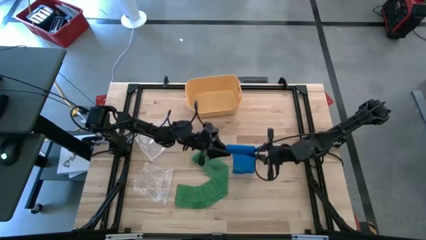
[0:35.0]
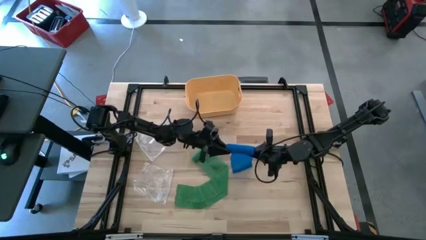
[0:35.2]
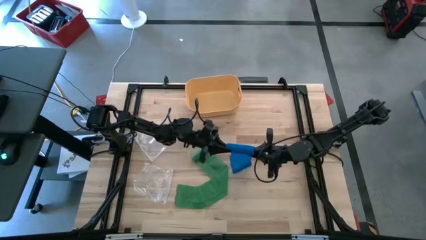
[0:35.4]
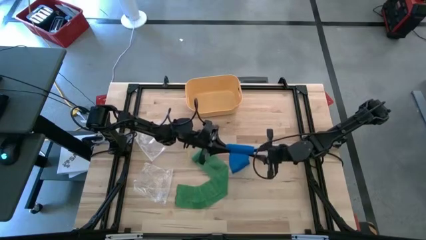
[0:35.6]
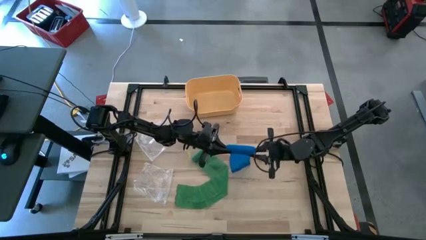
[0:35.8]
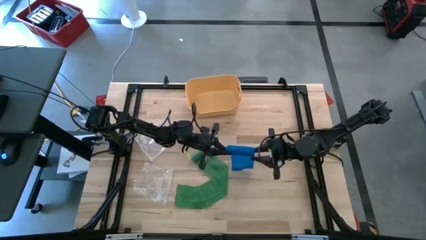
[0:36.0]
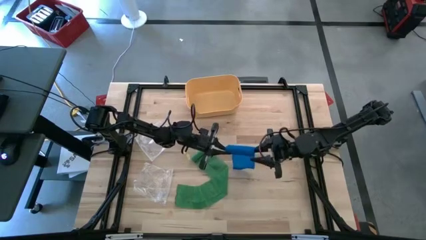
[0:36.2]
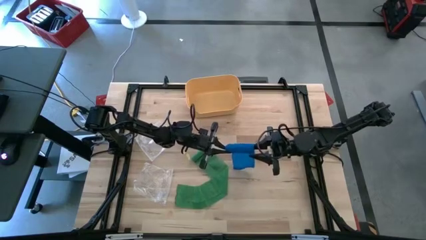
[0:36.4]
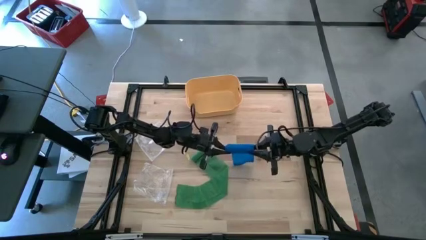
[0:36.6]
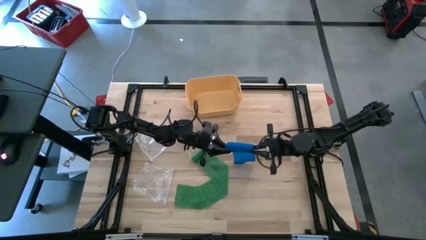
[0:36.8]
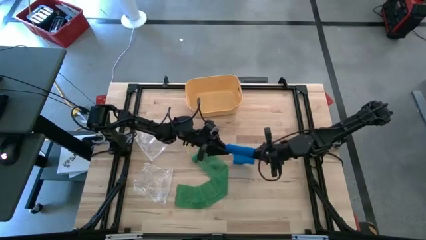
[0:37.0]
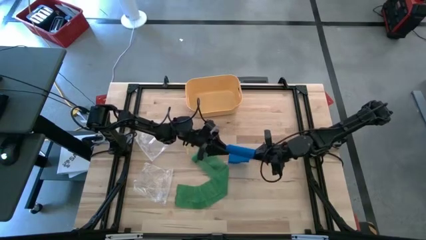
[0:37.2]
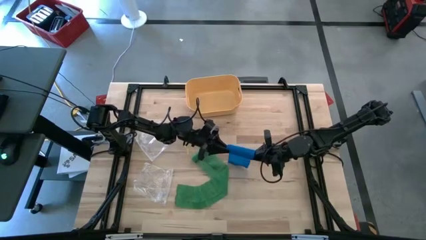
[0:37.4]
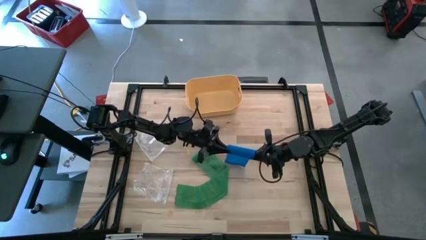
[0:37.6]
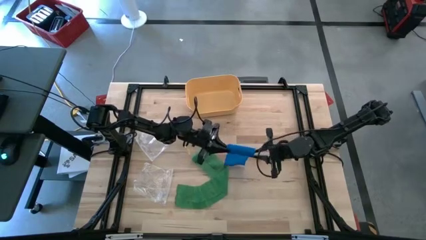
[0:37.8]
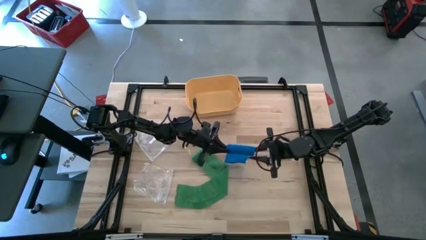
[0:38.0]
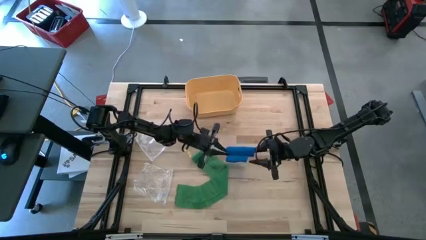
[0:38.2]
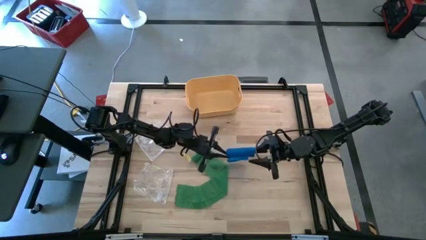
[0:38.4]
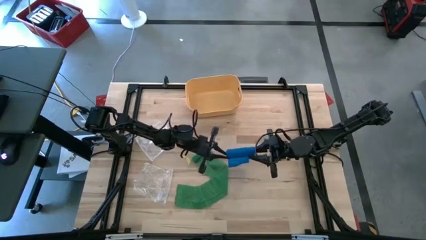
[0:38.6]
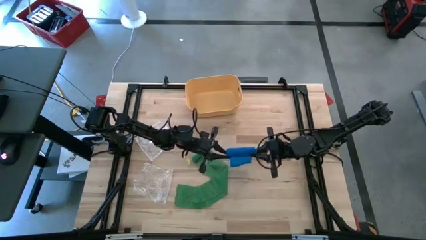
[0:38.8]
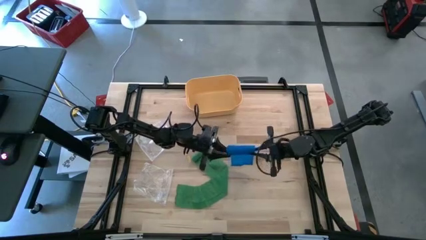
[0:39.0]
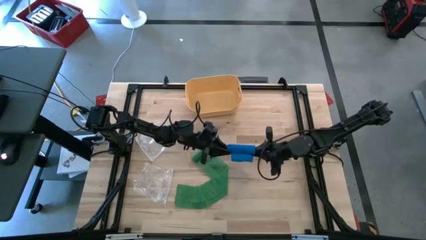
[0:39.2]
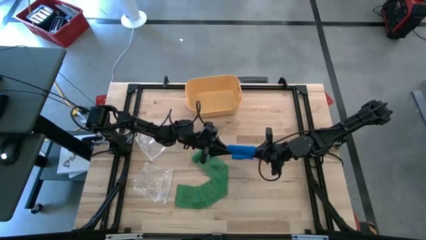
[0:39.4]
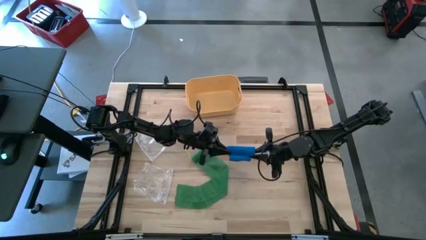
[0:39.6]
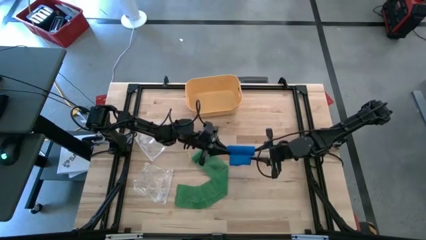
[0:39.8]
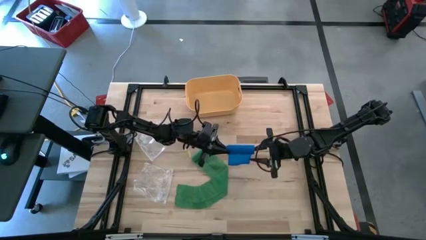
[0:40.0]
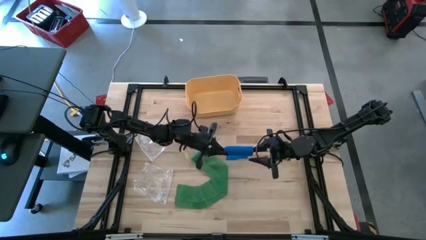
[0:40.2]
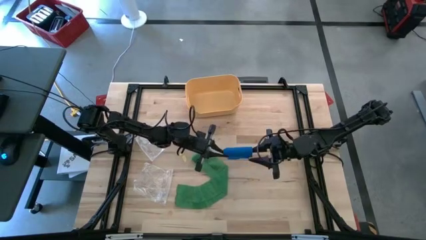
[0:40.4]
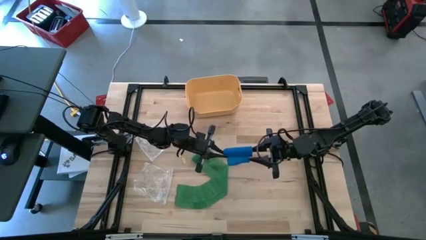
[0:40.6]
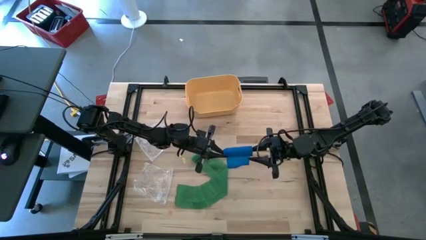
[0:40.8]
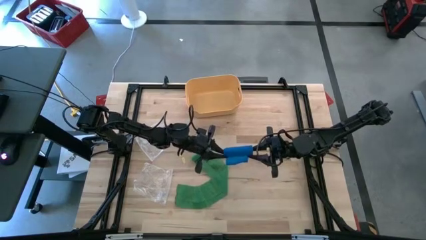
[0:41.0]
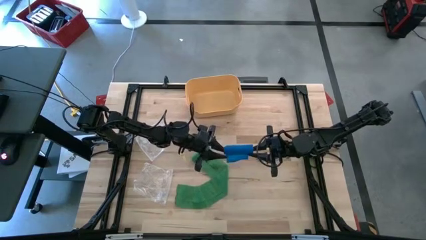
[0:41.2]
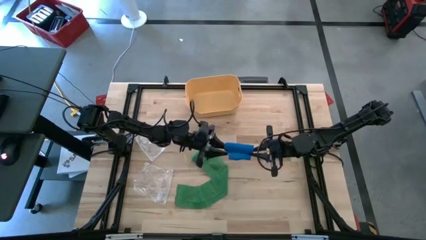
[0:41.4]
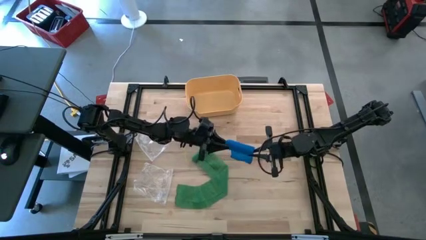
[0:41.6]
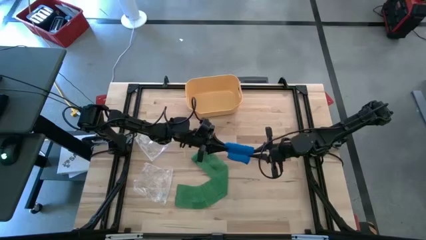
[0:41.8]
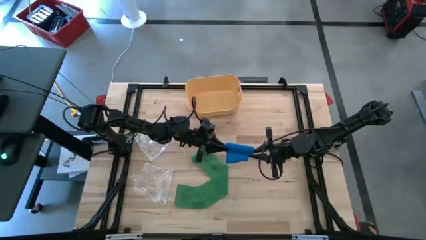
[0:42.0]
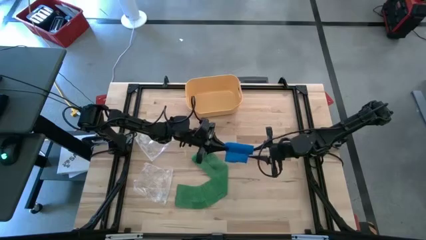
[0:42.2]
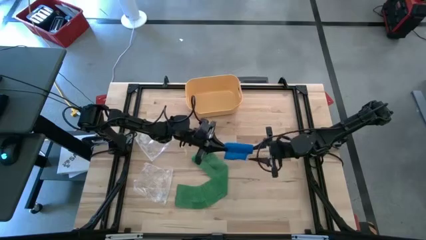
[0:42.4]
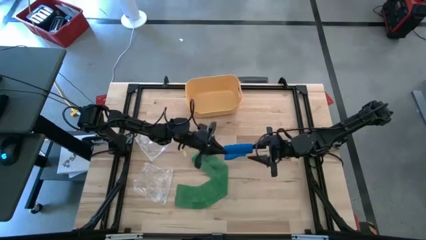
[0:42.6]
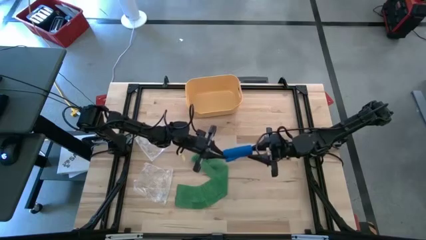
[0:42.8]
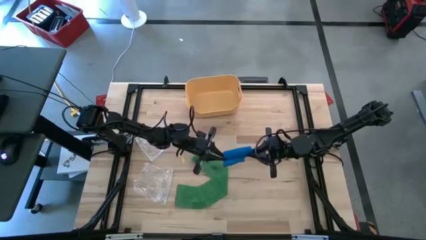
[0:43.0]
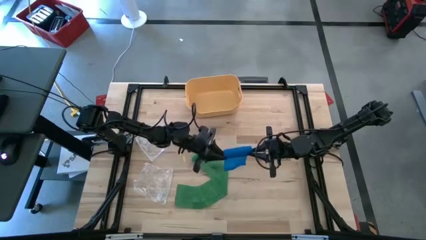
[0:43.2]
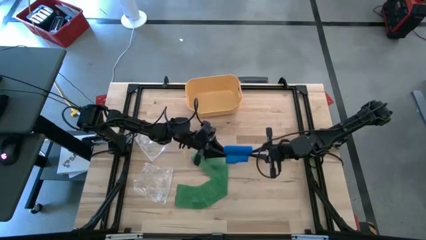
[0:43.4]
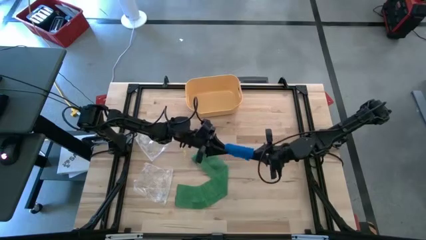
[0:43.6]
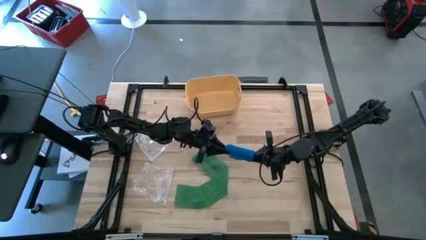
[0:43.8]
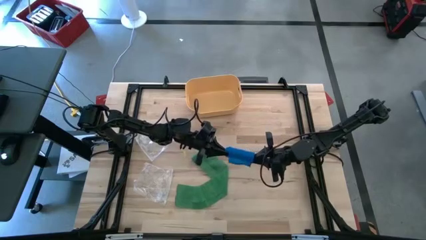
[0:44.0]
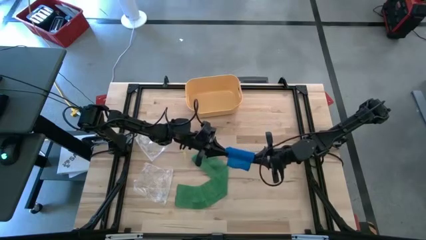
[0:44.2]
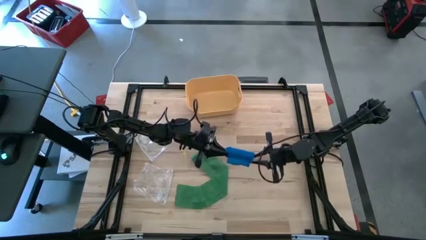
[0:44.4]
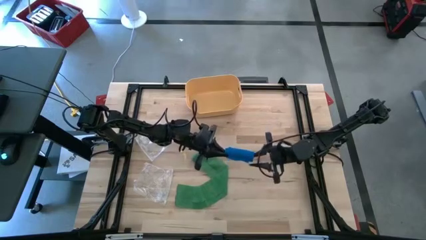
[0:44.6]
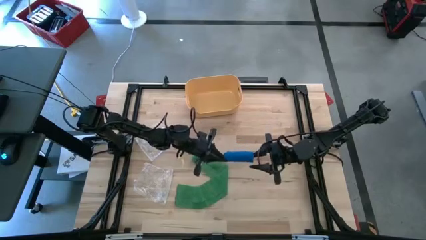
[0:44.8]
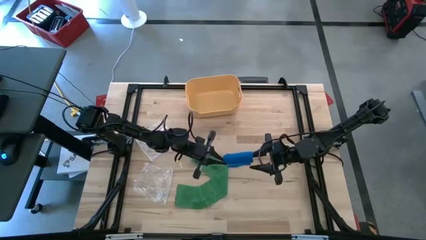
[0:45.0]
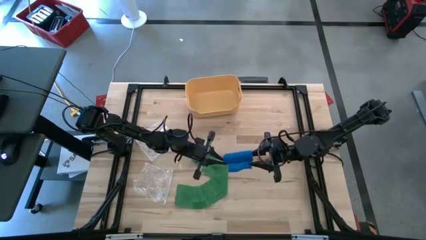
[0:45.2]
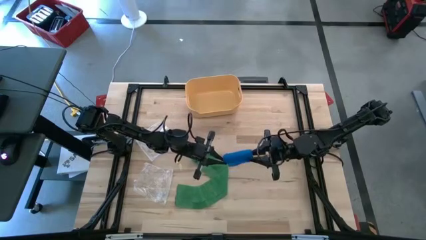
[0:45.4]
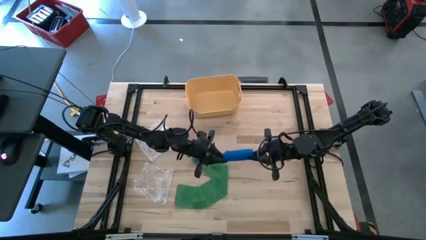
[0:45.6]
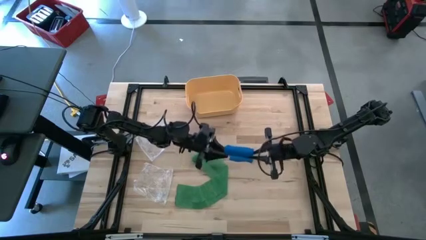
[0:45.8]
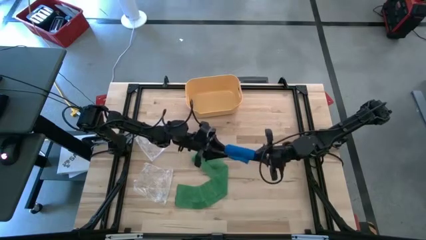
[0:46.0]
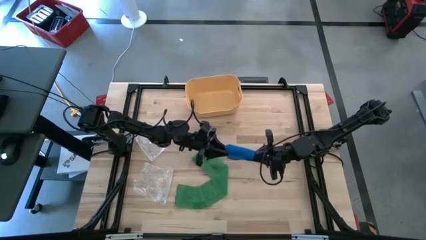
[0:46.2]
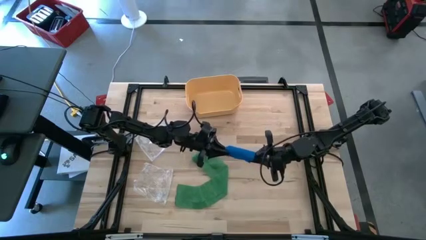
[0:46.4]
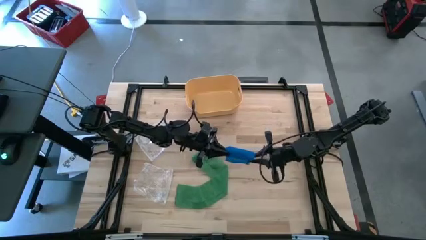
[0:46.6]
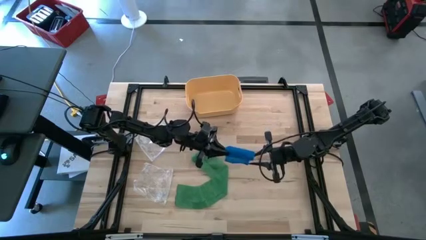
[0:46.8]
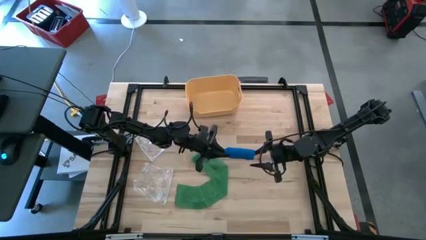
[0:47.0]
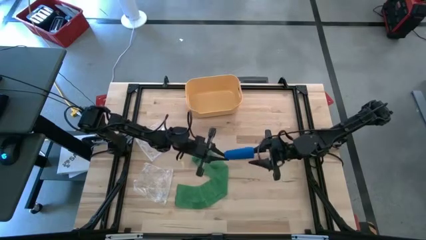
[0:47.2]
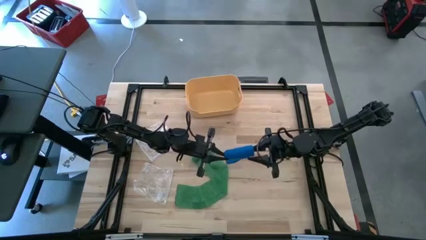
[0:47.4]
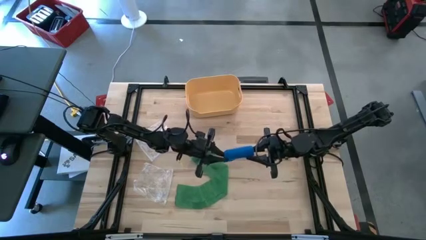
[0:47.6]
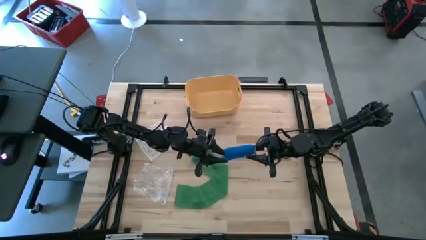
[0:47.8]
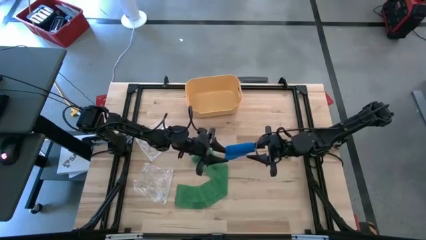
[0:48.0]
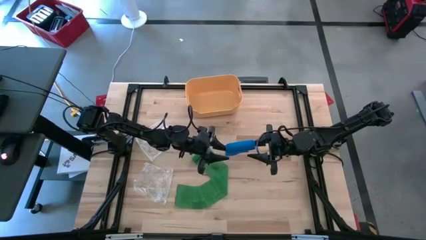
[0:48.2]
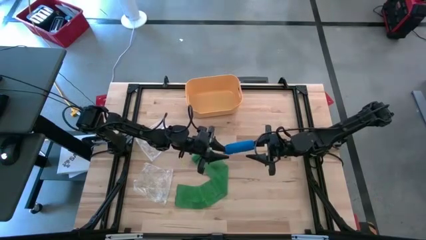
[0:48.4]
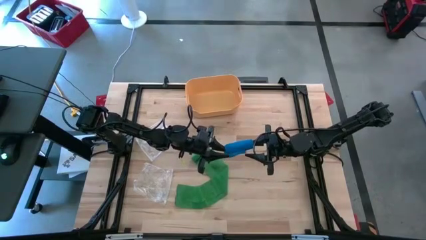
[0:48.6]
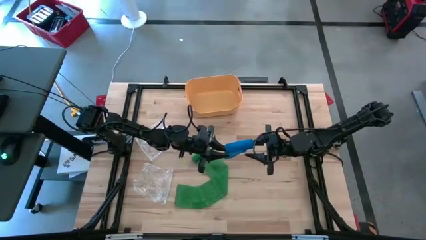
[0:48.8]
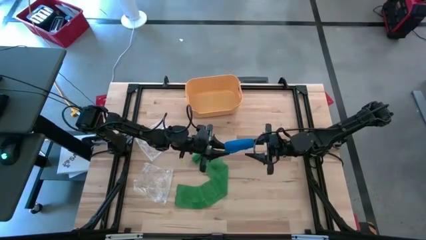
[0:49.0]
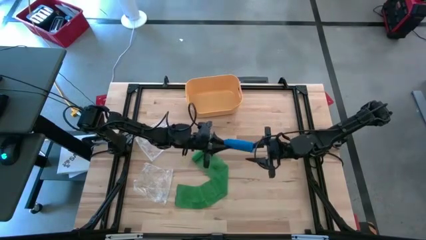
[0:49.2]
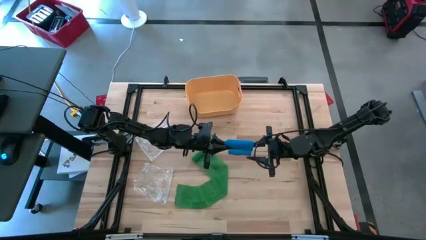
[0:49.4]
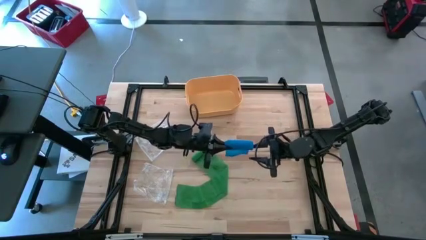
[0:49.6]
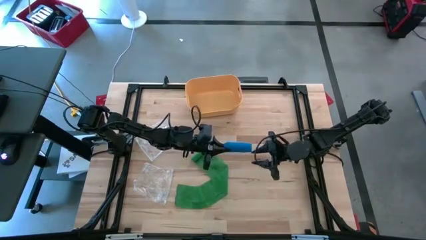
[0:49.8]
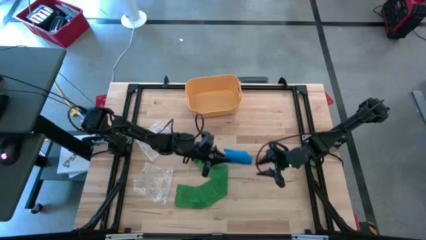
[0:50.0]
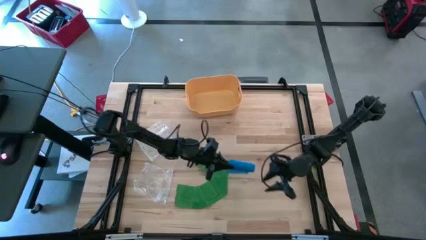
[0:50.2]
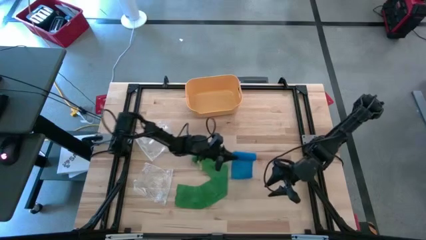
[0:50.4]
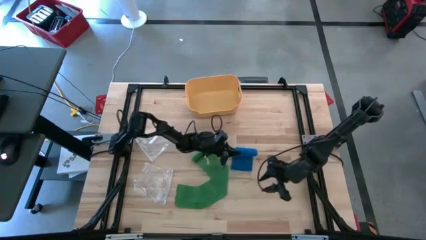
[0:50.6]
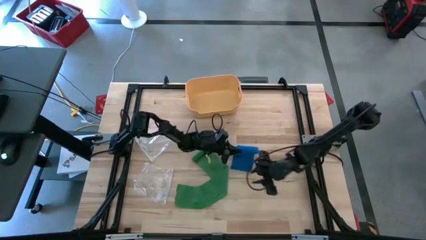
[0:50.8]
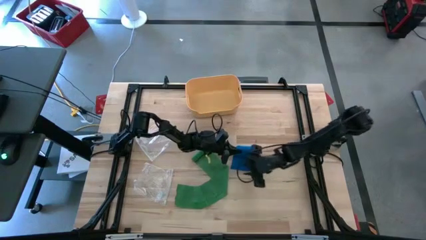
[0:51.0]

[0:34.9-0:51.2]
Task: Roll bandage
Roll the blue bandage
